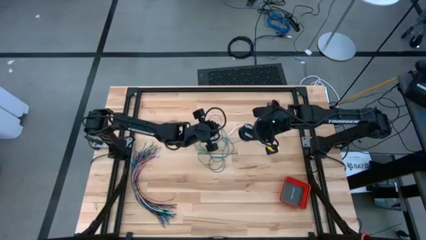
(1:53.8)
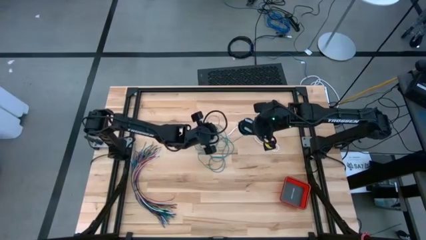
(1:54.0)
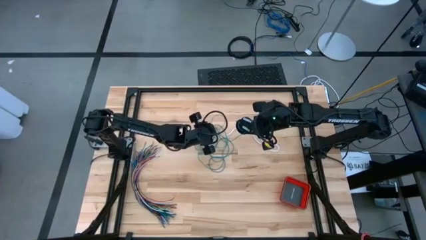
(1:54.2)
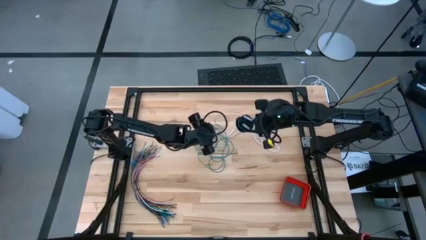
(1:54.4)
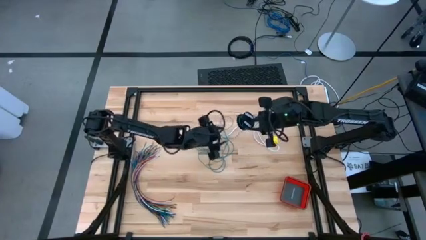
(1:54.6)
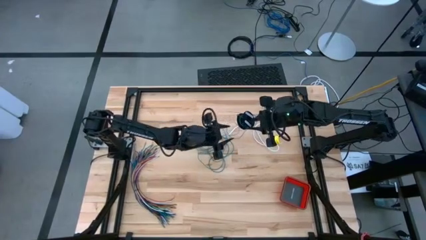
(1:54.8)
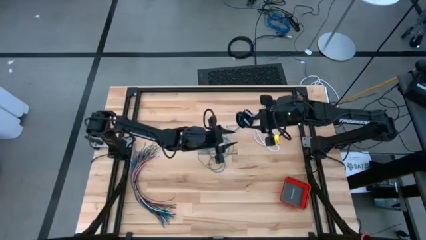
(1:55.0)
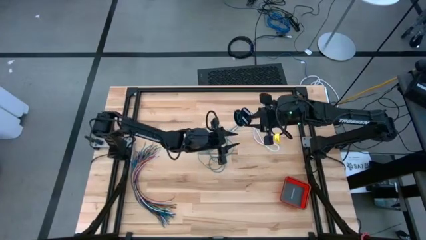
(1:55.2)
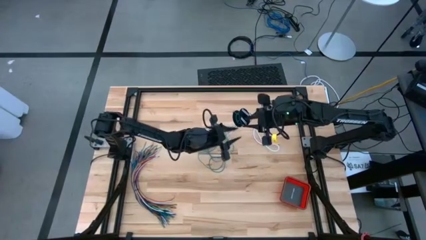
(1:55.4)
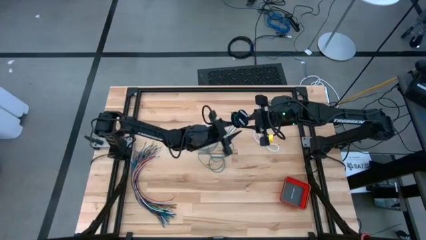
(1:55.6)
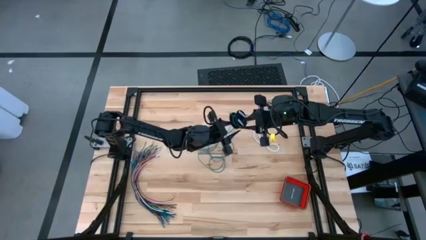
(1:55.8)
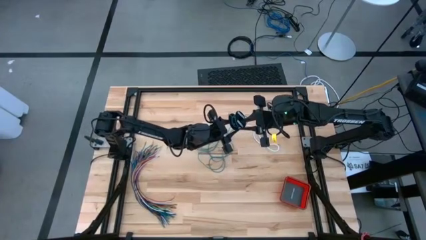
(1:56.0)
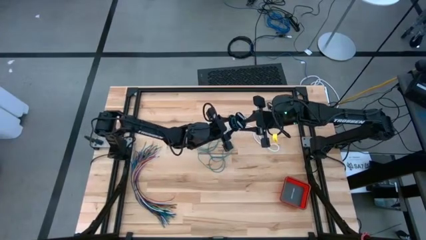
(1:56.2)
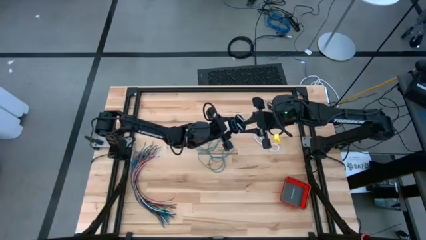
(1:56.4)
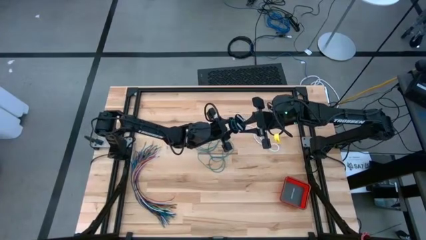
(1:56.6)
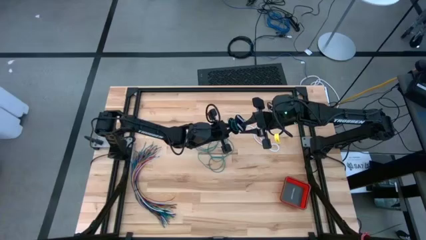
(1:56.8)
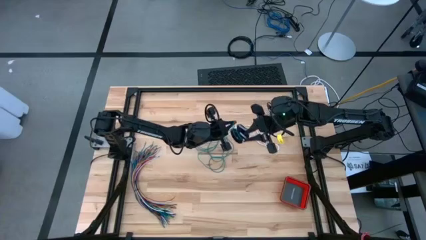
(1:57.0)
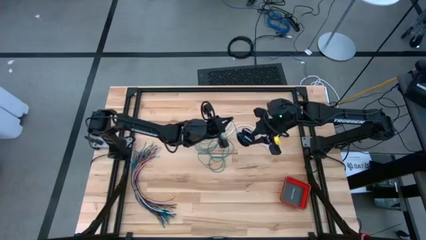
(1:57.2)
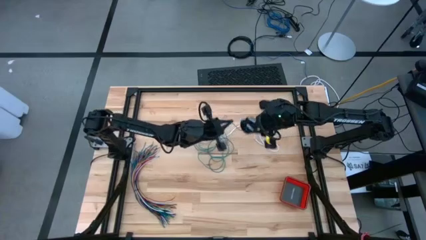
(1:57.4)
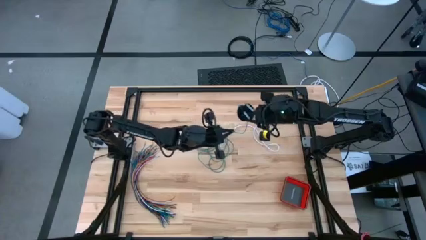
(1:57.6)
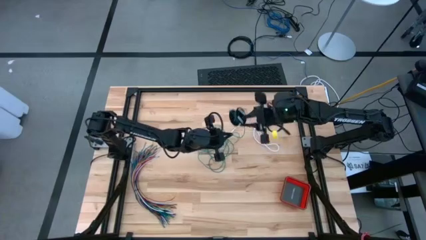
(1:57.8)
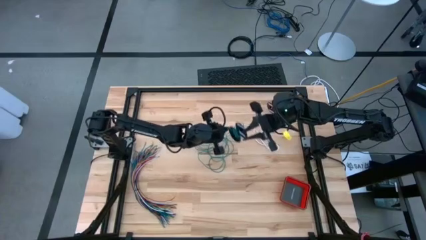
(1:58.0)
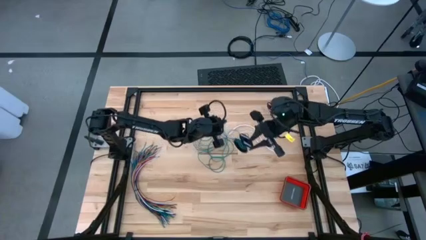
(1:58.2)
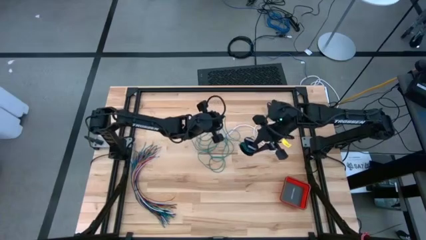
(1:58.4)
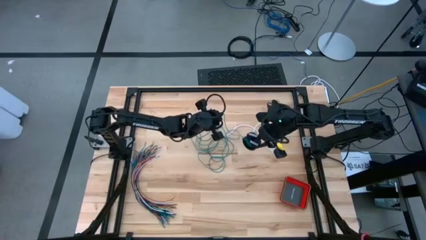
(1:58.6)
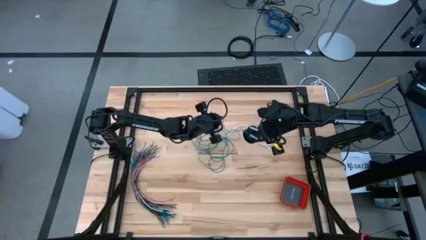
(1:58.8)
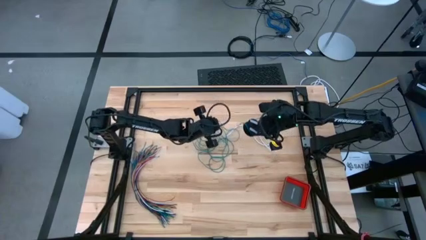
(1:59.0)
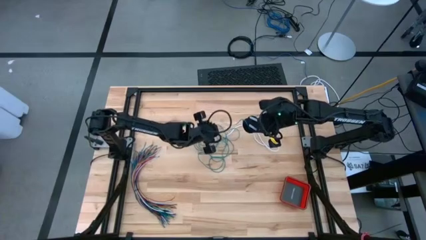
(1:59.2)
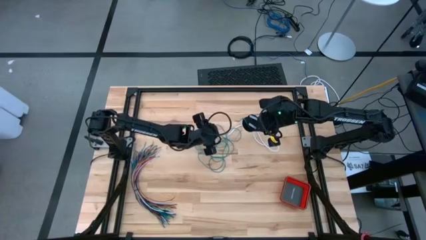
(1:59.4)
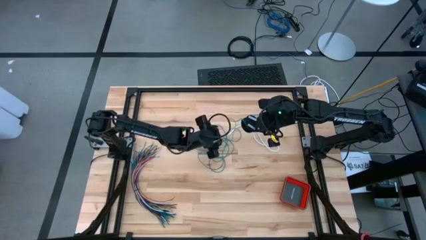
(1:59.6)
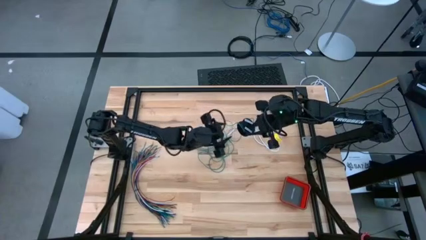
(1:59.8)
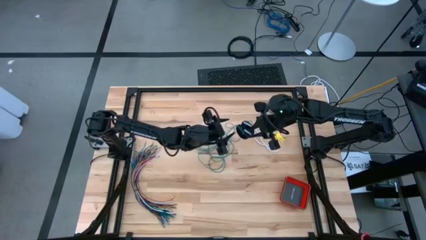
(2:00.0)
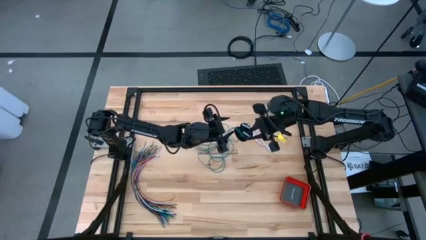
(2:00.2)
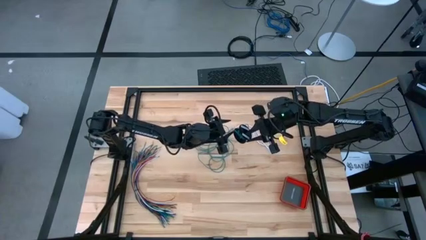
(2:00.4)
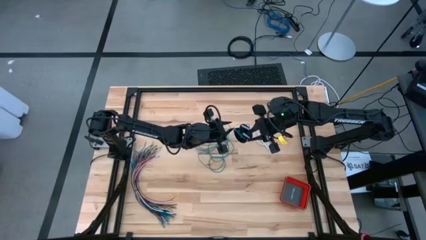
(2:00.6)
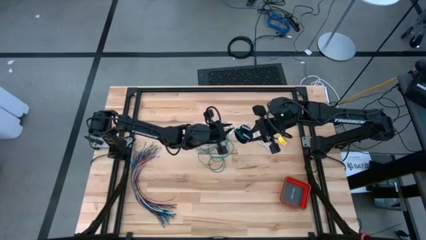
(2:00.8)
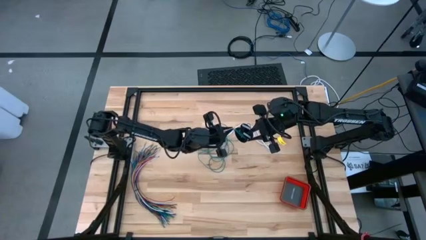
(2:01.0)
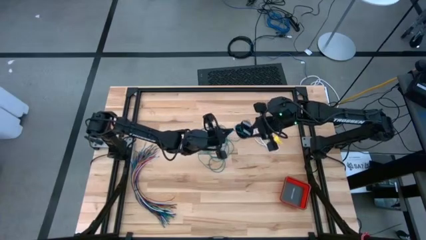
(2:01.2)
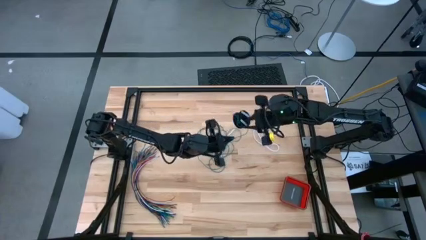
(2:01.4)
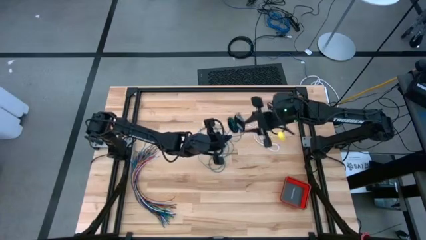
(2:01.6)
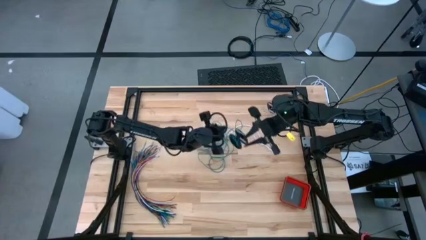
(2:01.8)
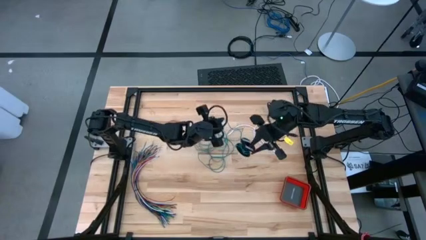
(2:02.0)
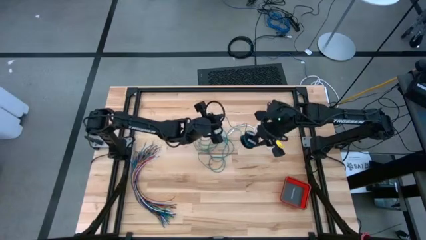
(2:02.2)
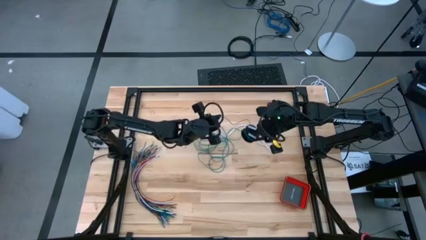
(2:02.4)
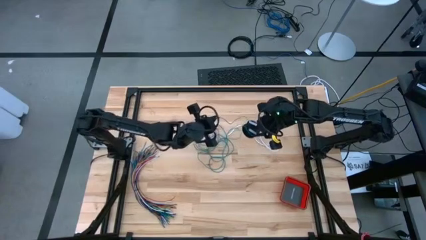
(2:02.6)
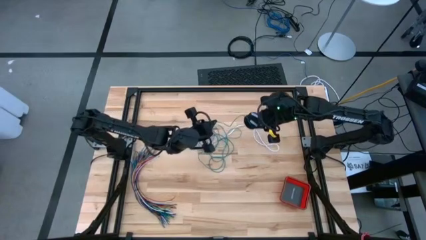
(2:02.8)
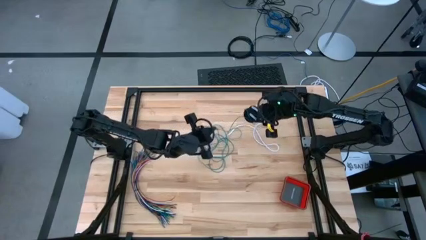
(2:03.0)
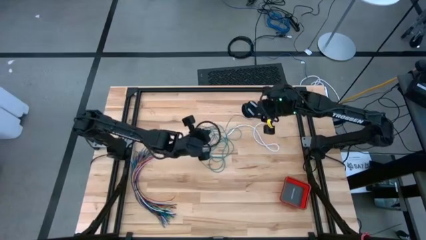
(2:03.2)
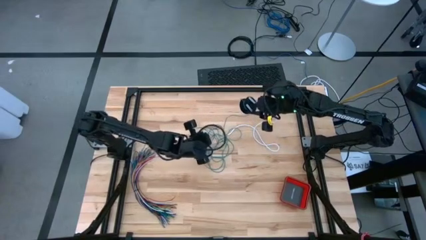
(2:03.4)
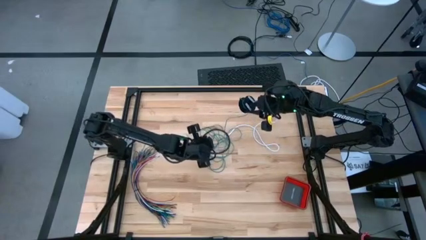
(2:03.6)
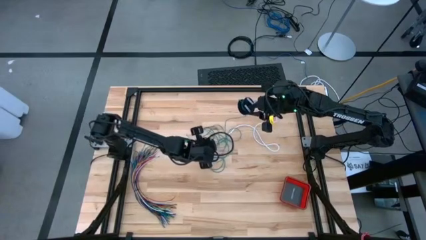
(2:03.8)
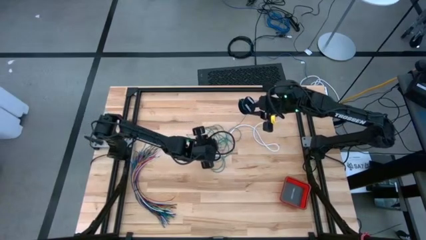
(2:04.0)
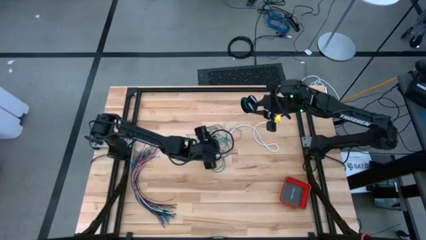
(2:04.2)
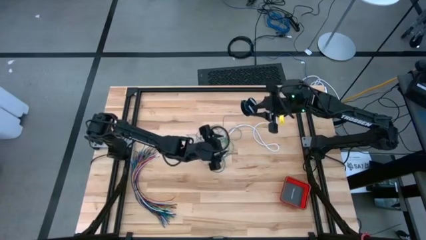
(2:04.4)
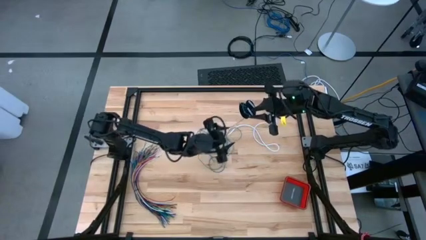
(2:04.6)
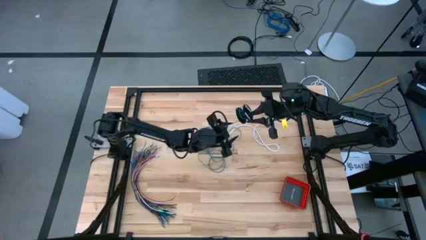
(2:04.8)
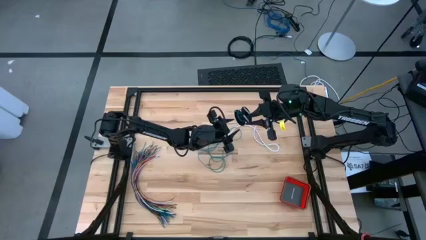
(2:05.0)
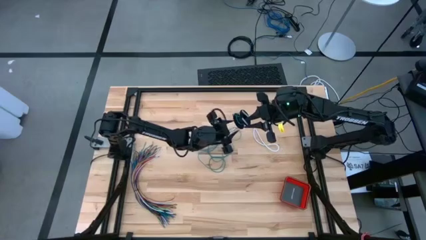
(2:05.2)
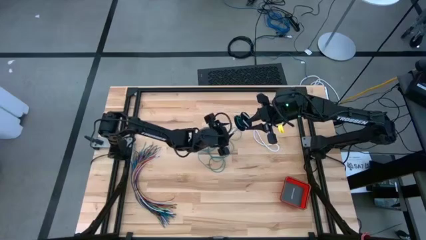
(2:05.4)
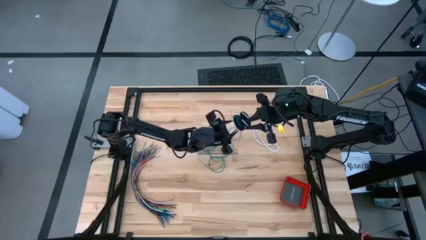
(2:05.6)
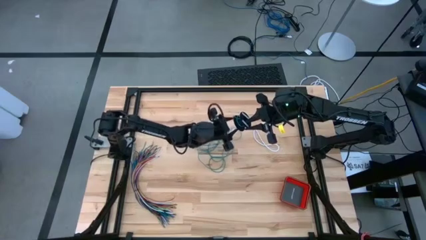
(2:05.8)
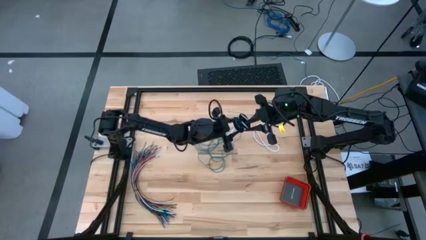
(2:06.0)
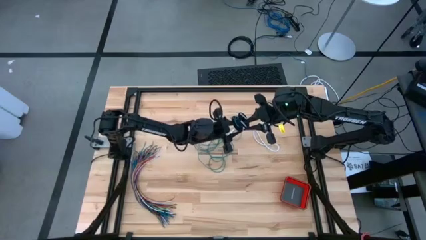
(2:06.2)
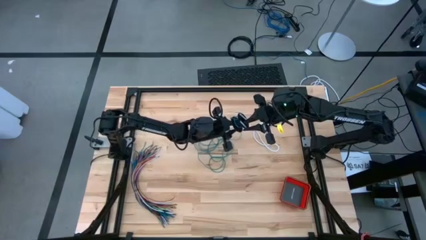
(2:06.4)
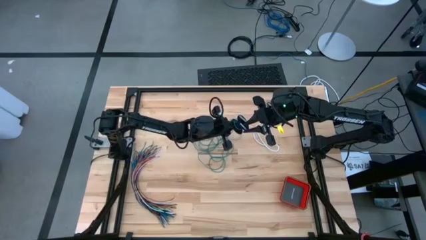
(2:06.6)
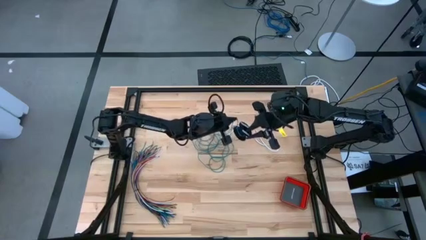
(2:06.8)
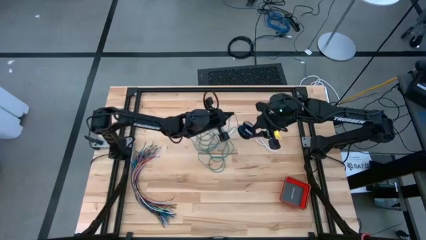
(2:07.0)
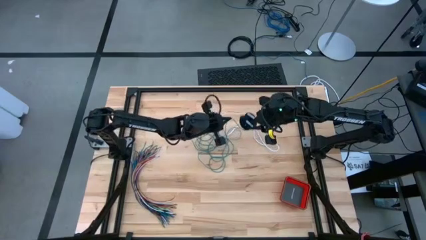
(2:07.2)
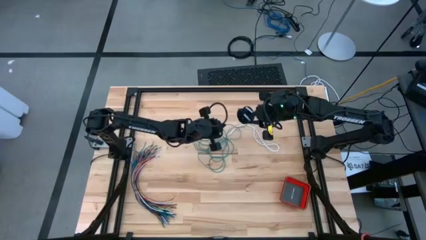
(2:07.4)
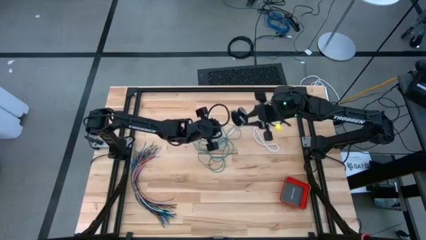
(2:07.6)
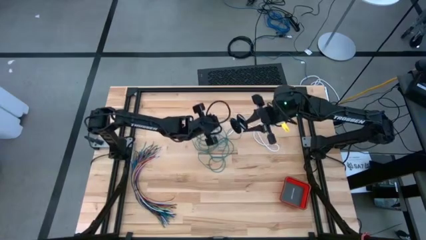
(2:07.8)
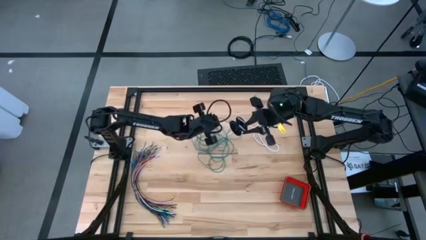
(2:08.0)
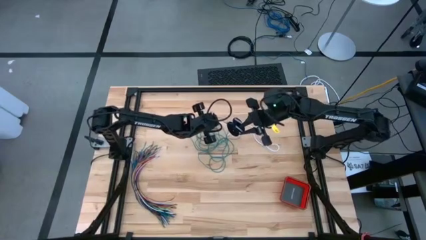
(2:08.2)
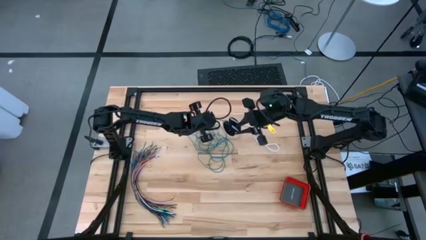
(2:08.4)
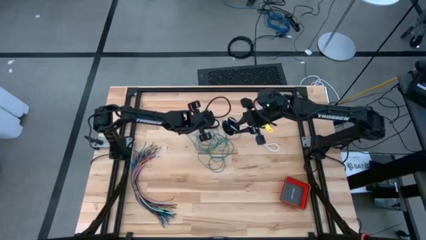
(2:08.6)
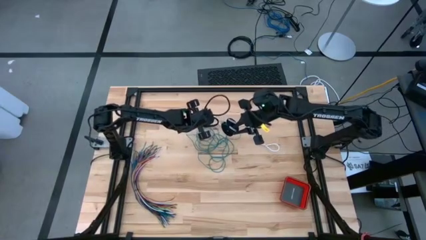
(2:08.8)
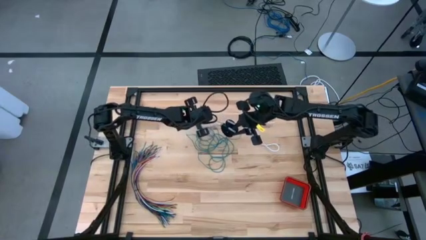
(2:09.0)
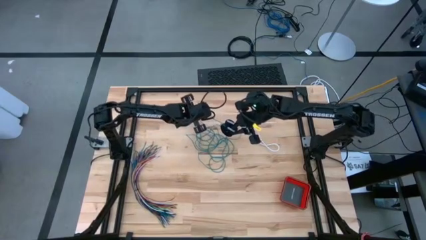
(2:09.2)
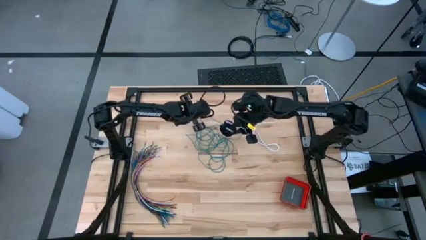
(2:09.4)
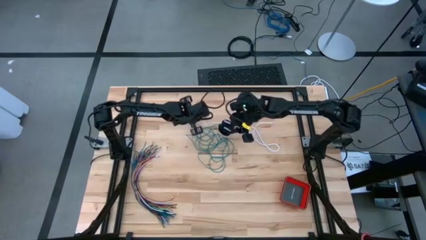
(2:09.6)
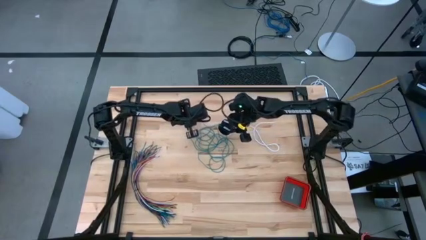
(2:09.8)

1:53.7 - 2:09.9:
Task: Coil cords
Uncoil the green wire from the spool

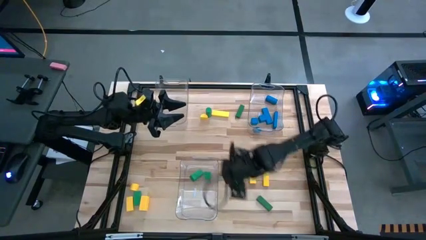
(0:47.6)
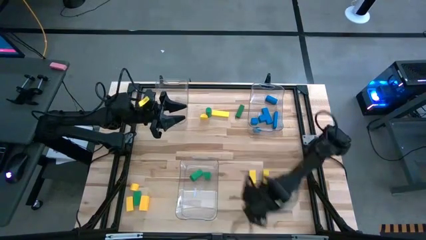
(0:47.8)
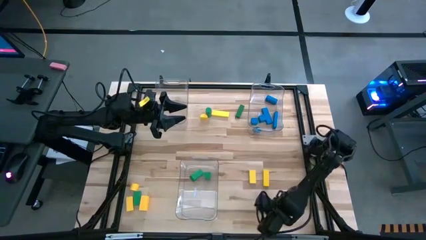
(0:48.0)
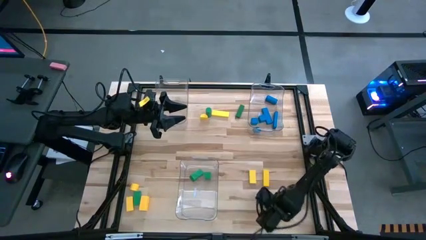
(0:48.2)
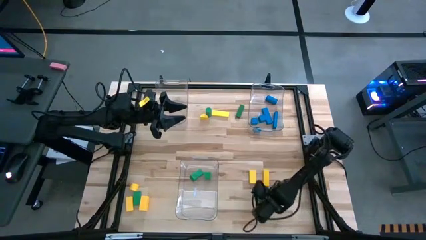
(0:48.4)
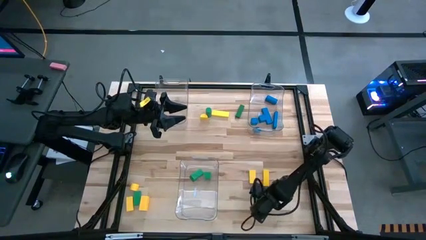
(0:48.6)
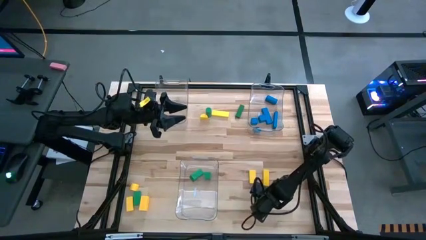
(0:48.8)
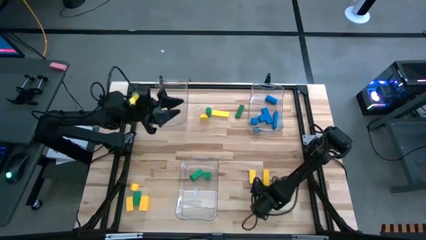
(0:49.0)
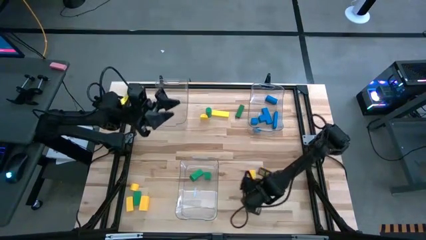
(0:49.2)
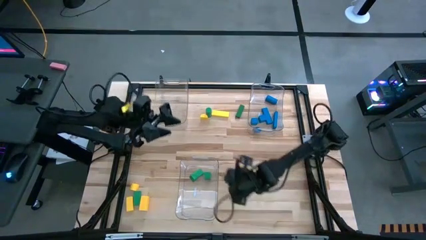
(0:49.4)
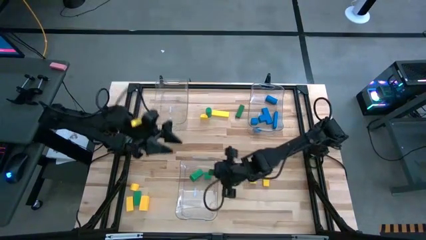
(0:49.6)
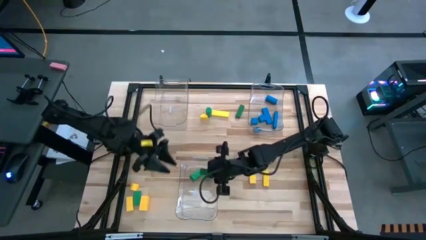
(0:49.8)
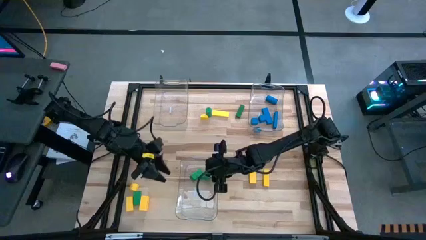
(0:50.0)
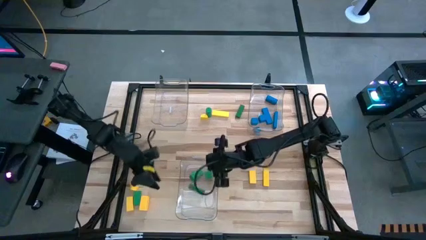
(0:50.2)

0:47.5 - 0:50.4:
Task: Sort blocks
Put the green block into the bottom transparent bin
